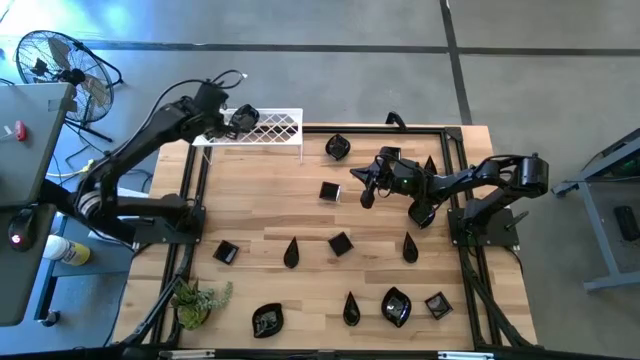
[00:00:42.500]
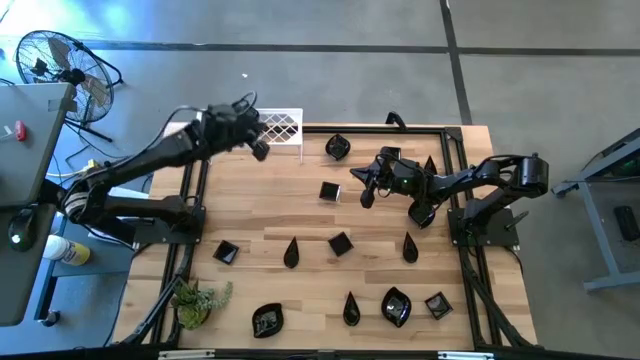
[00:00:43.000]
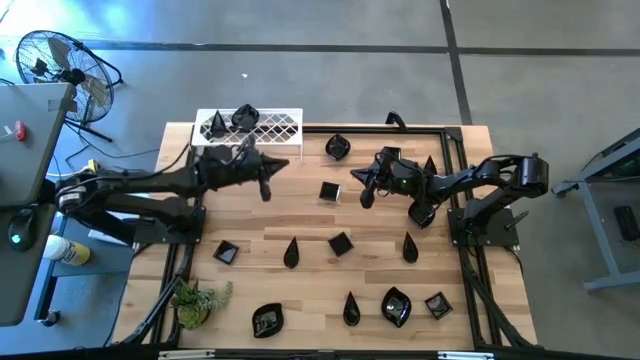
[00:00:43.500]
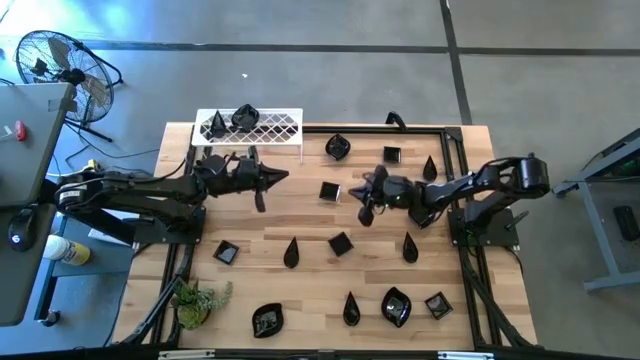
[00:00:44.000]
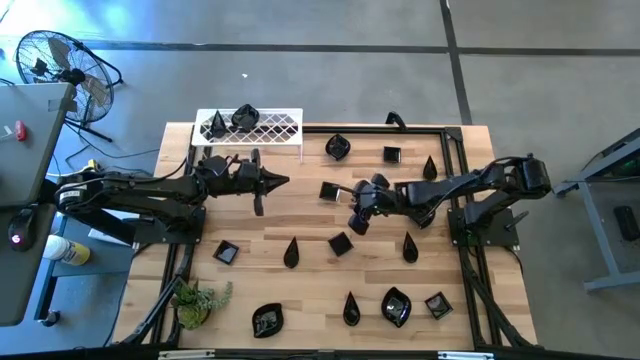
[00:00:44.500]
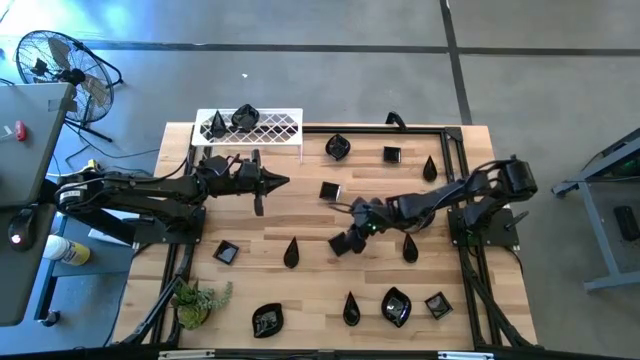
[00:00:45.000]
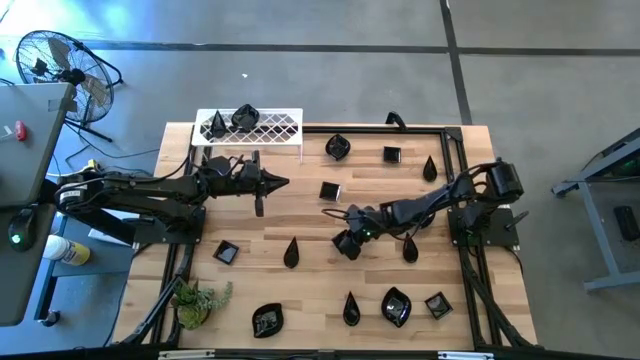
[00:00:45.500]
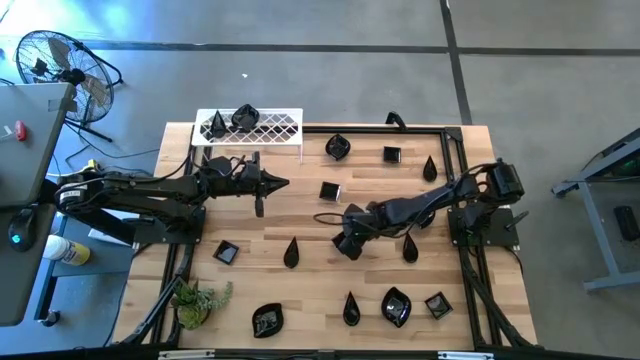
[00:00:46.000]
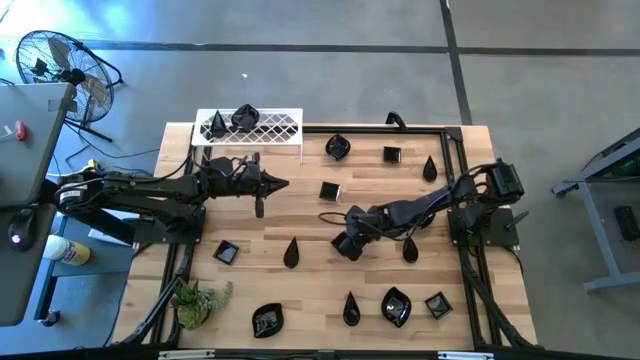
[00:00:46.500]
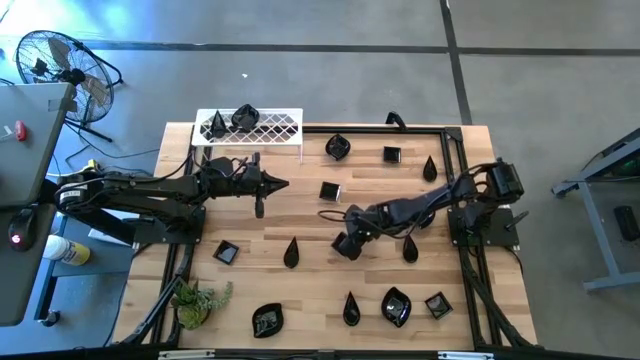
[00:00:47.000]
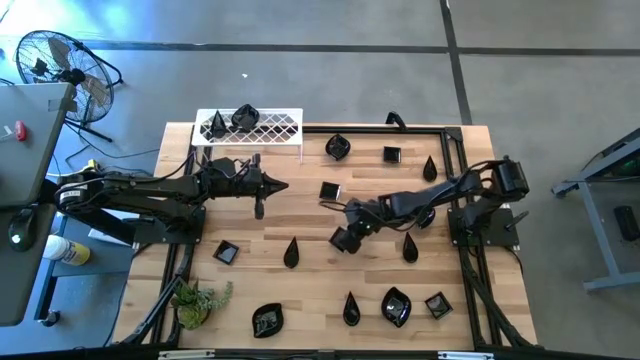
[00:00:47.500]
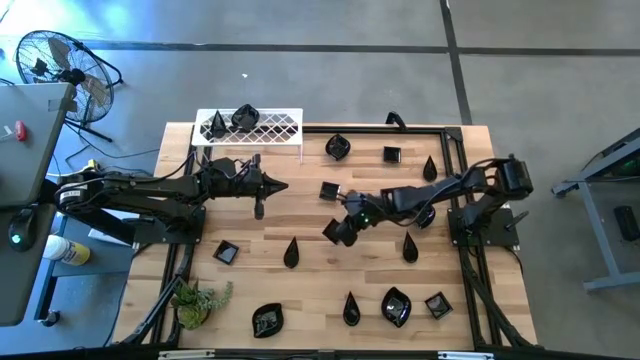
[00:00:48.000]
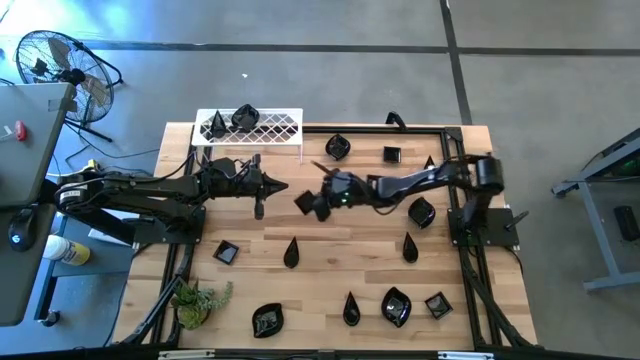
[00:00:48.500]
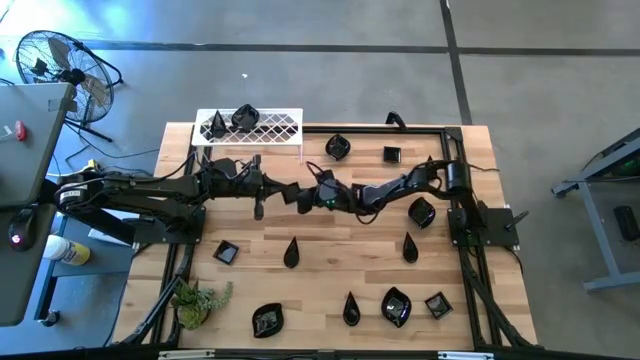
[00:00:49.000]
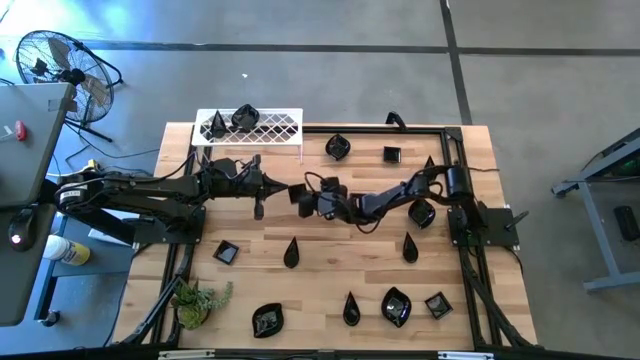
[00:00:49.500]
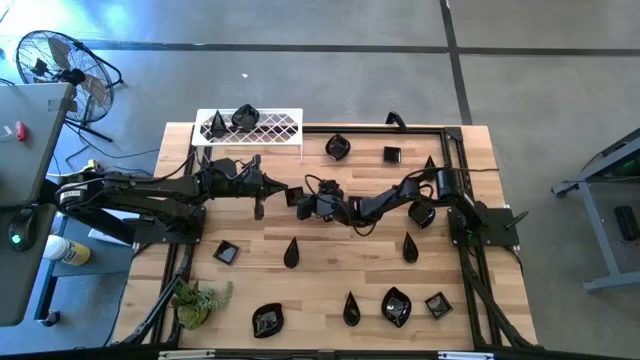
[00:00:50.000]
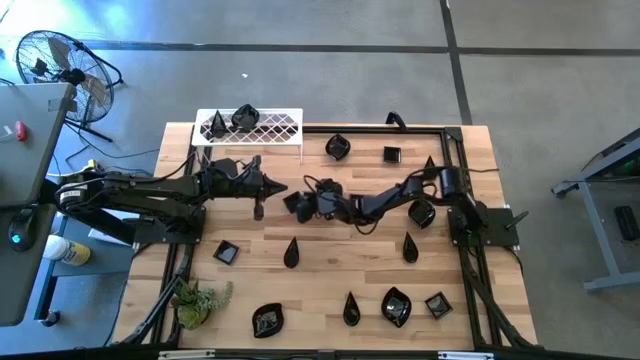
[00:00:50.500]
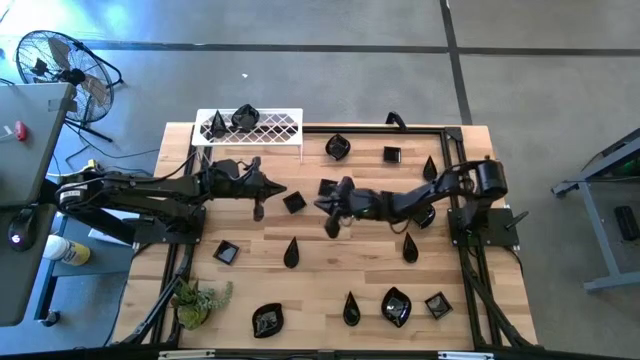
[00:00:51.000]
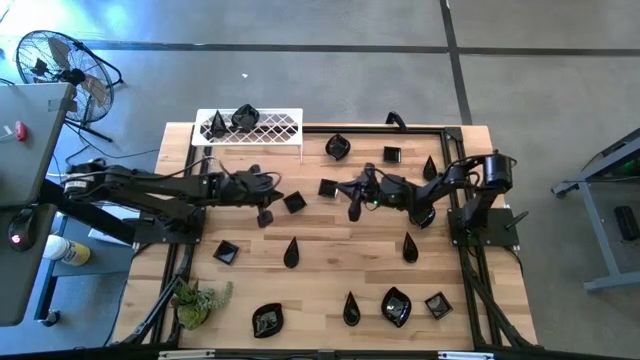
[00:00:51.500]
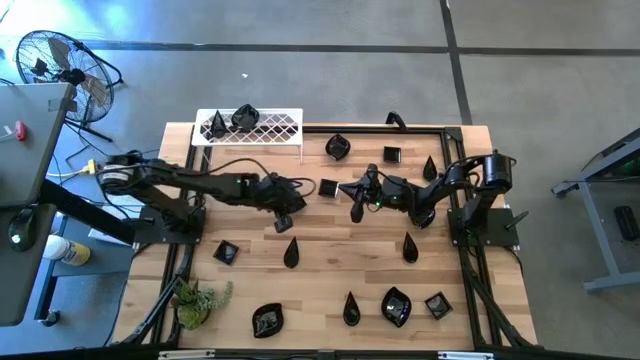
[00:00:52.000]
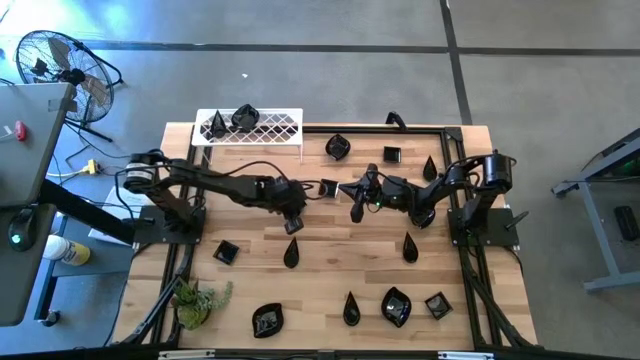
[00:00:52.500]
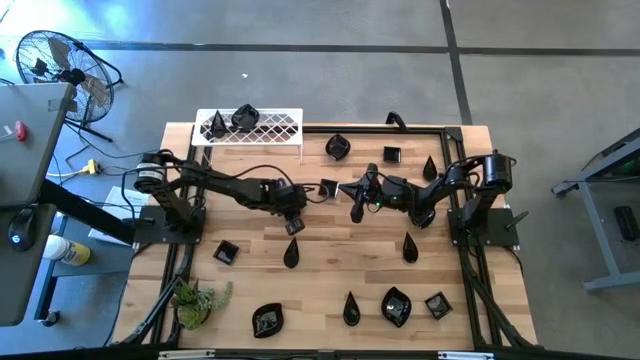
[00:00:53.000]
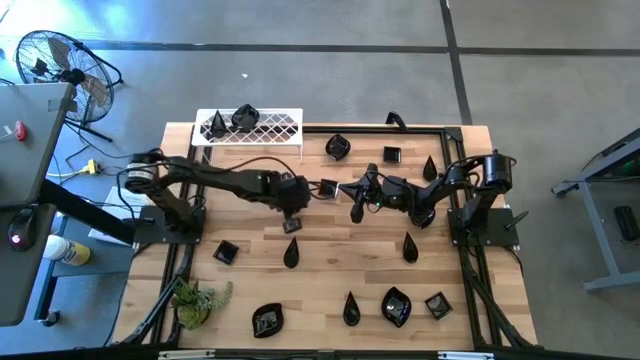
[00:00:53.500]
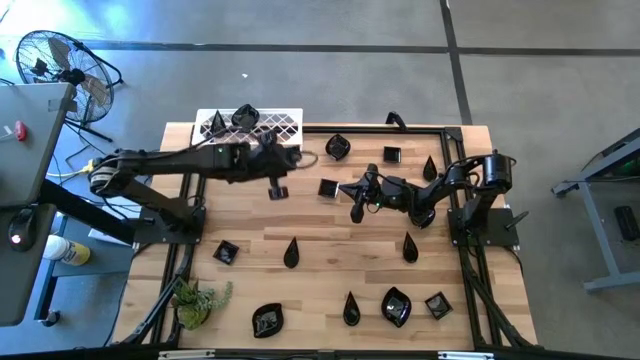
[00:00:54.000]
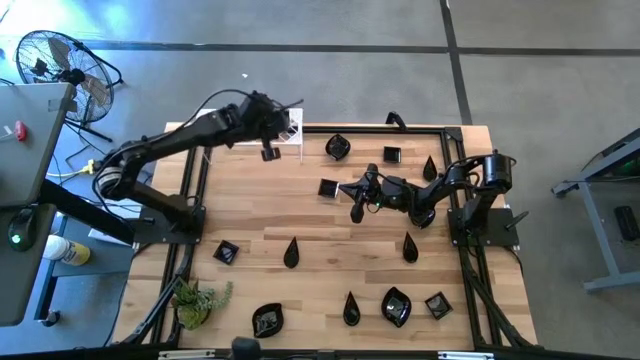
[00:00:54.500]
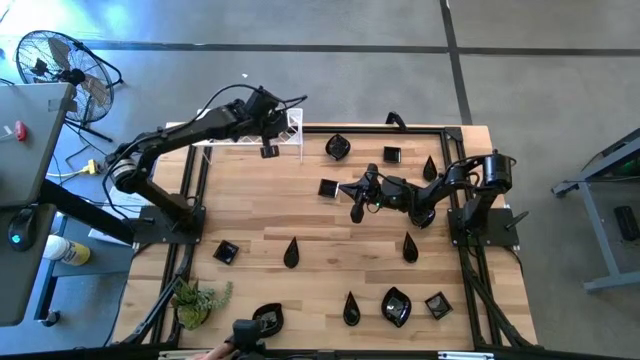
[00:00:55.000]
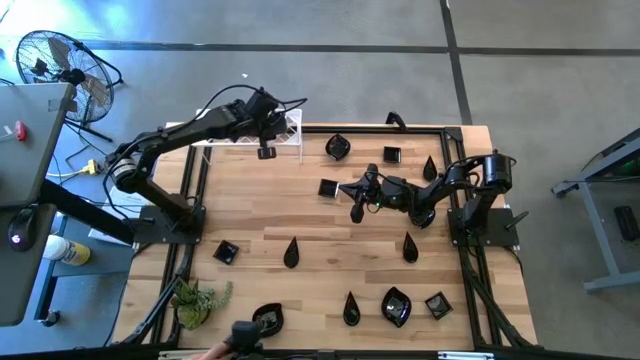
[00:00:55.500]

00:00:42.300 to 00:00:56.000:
Task: Pick & Place Mini shaped plates
Put the square plate on the shelf

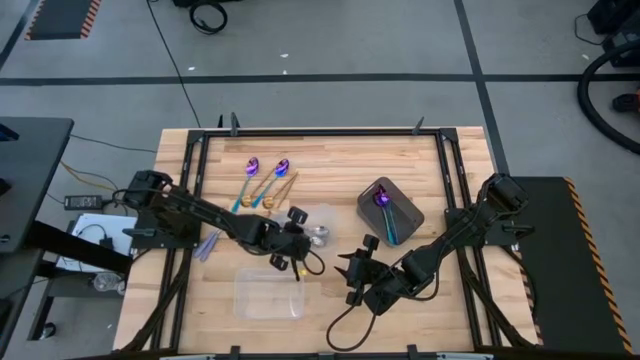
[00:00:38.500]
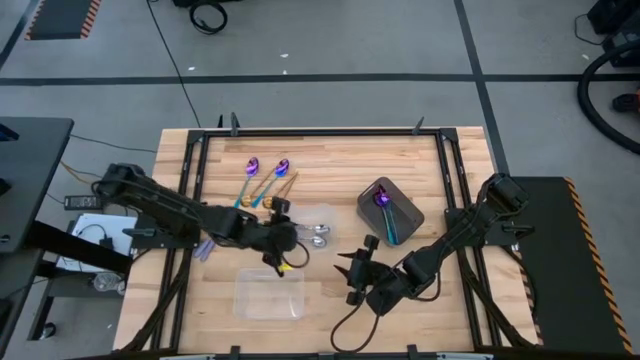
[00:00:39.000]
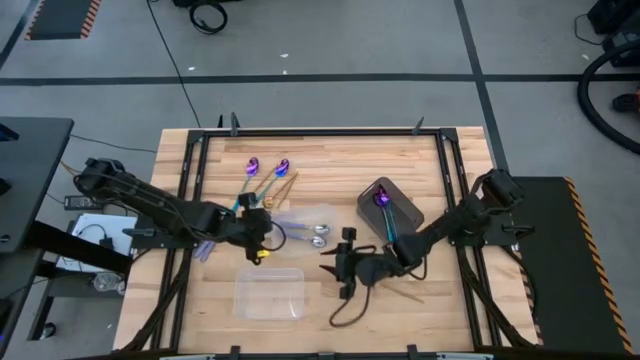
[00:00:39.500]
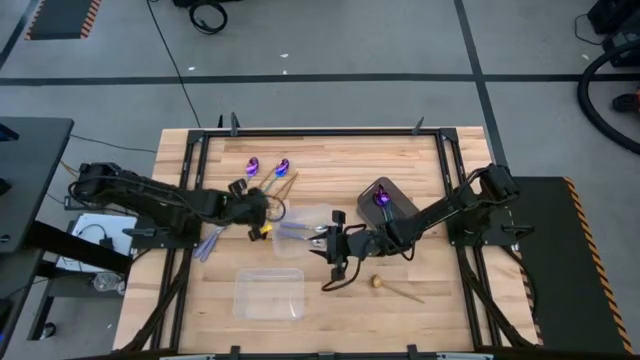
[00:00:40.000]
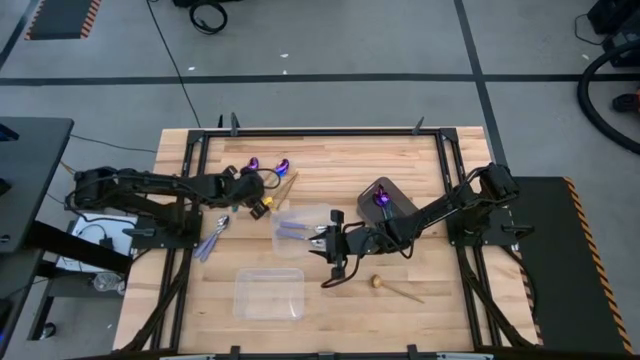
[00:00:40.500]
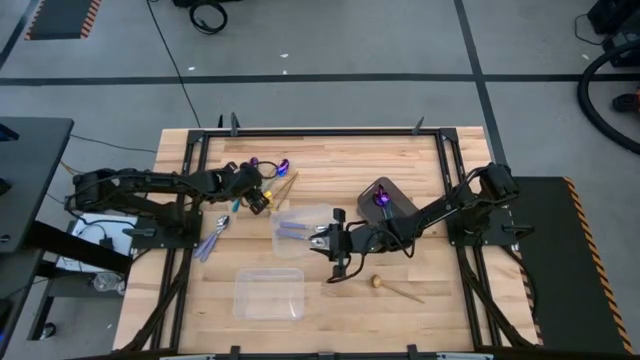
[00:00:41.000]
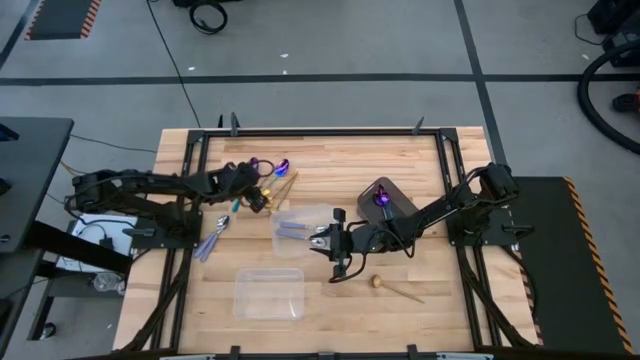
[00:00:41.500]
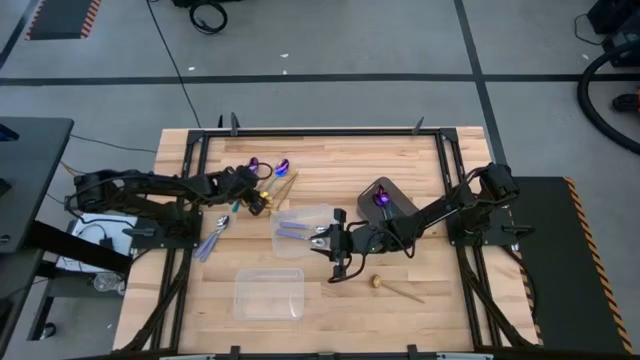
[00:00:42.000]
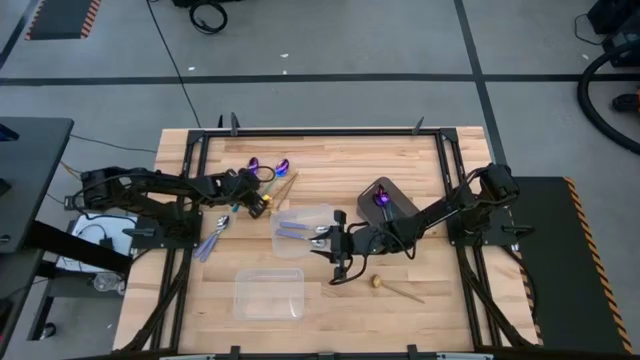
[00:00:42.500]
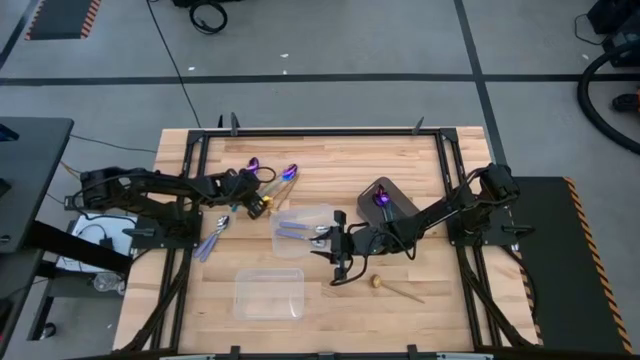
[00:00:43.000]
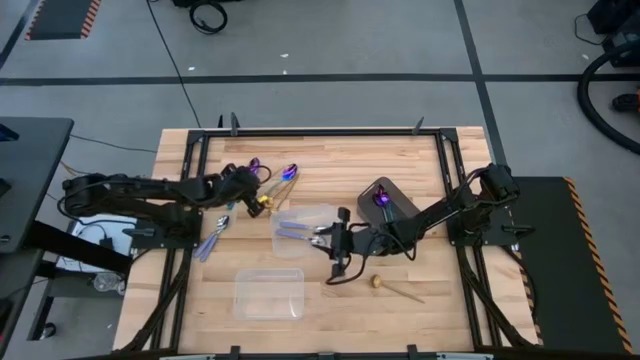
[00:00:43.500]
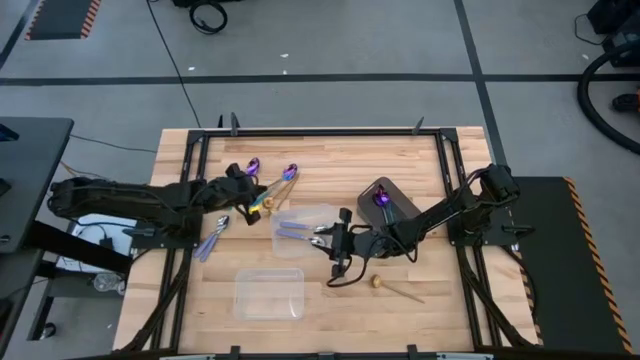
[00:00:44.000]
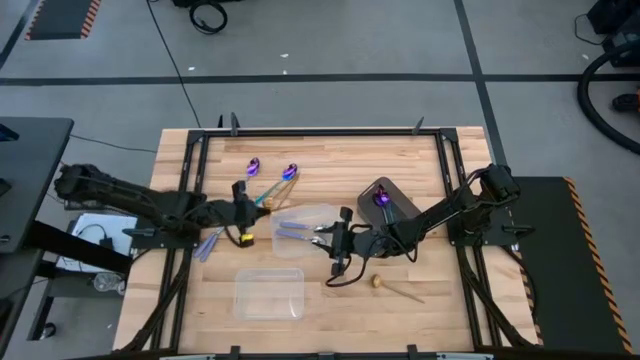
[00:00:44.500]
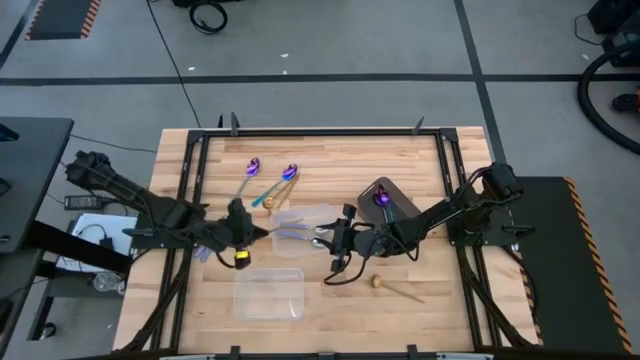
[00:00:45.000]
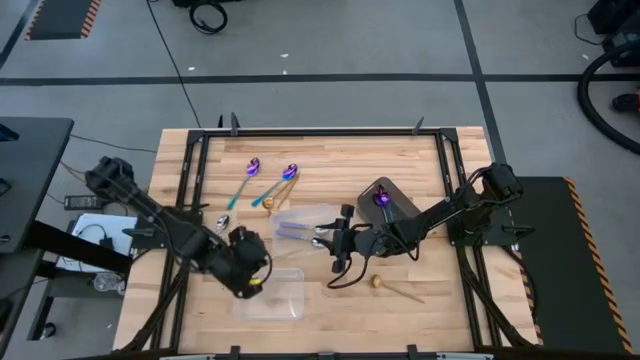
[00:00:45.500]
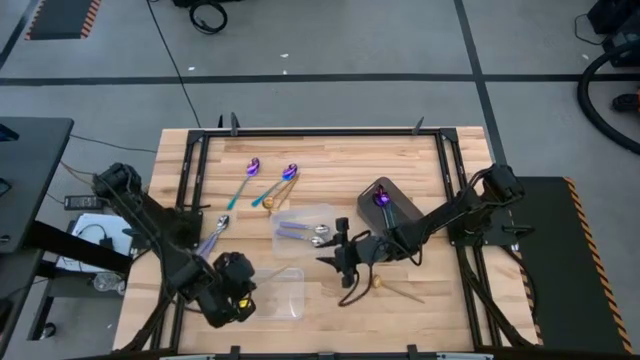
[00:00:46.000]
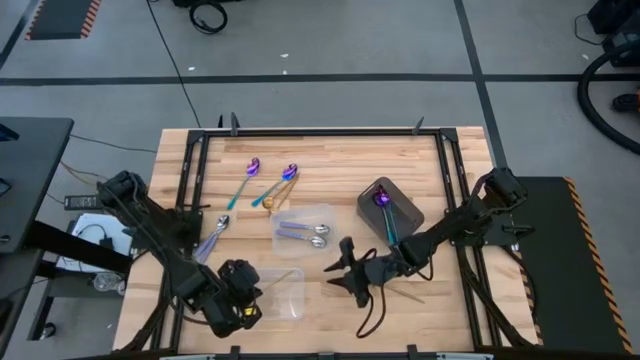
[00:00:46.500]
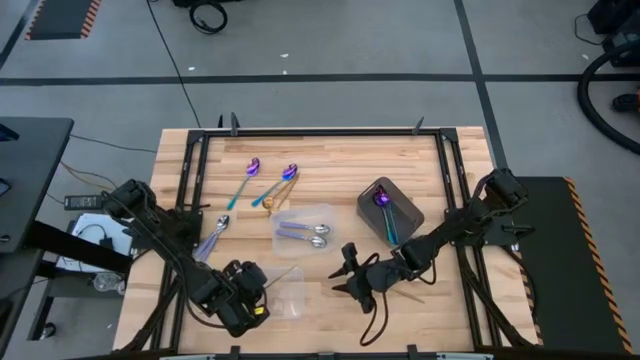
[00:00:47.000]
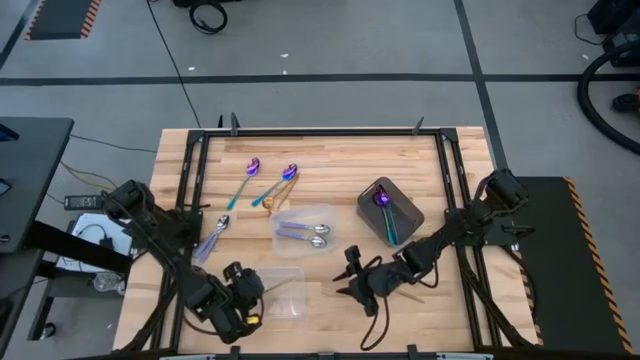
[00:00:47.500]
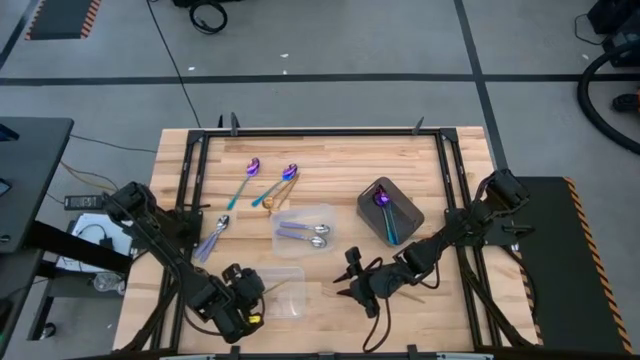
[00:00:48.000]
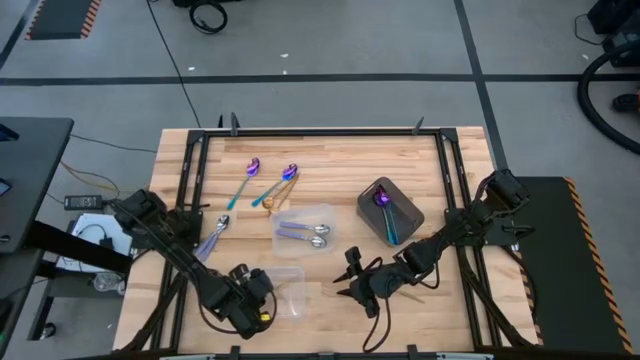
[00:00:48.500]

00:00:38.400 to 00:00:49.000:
Task: Sort silverware by color (type)
Put the gold spoon into the bottom transparent bin
